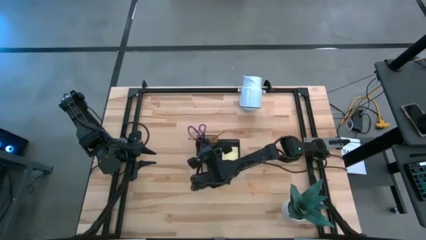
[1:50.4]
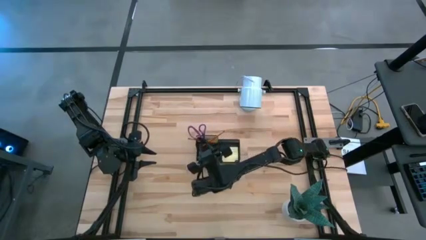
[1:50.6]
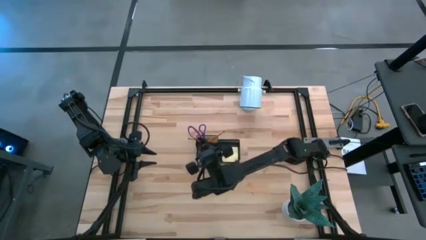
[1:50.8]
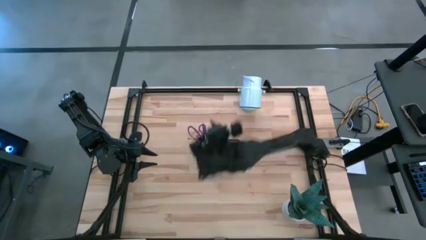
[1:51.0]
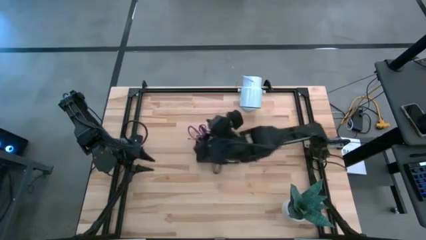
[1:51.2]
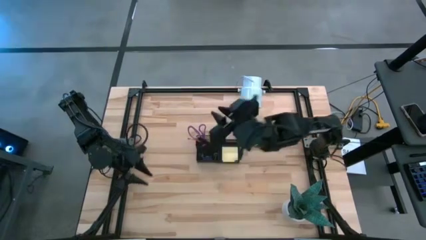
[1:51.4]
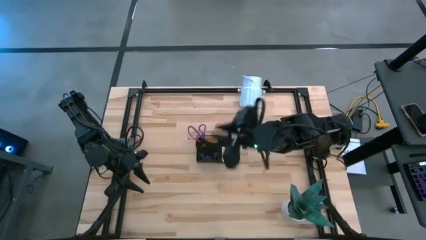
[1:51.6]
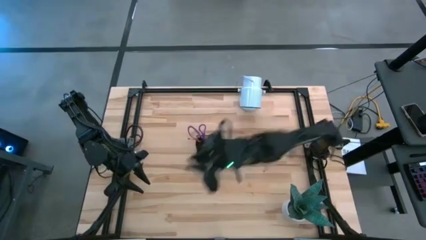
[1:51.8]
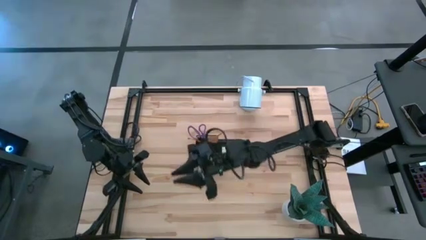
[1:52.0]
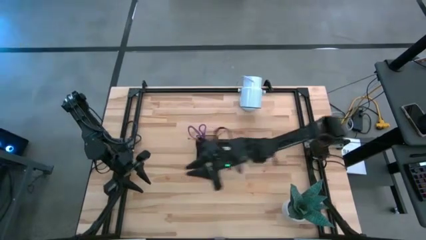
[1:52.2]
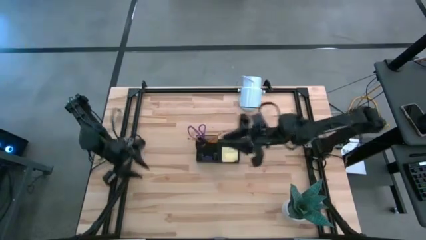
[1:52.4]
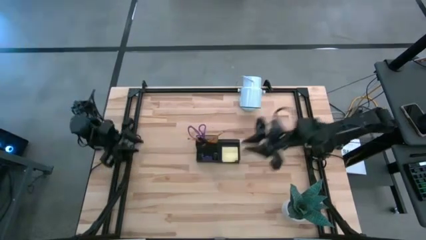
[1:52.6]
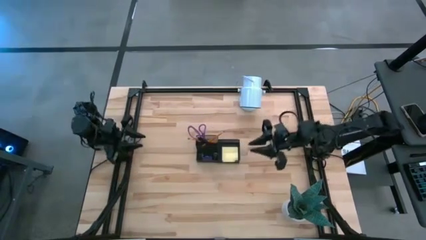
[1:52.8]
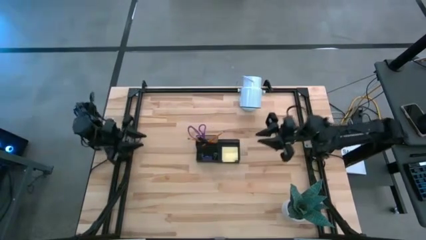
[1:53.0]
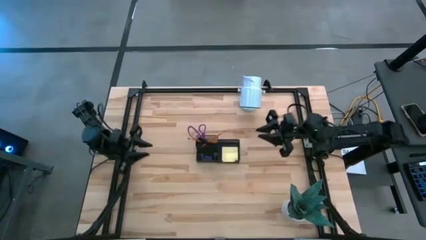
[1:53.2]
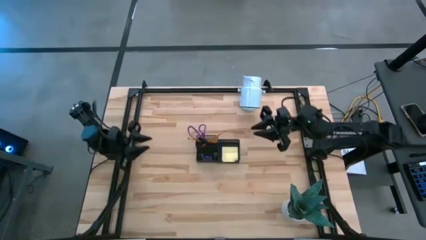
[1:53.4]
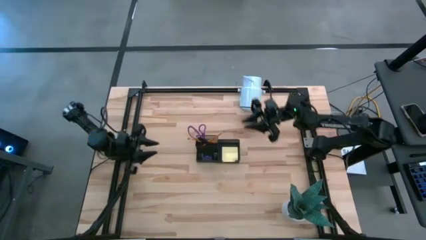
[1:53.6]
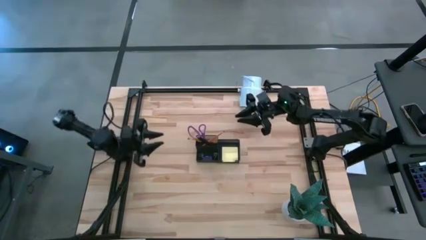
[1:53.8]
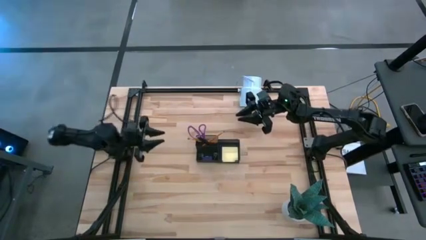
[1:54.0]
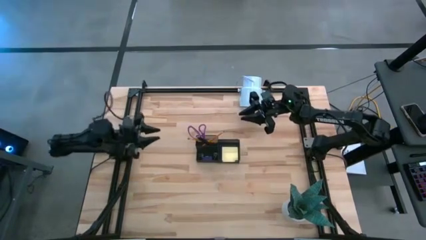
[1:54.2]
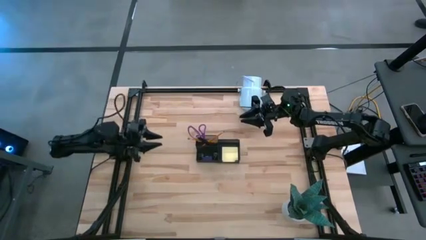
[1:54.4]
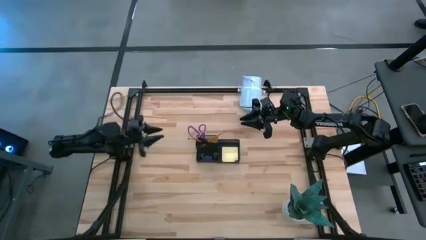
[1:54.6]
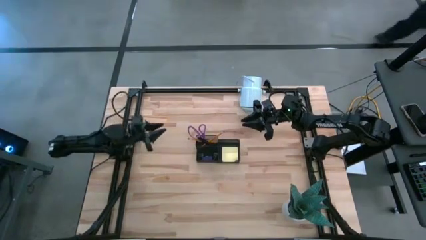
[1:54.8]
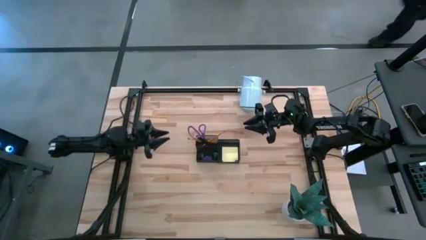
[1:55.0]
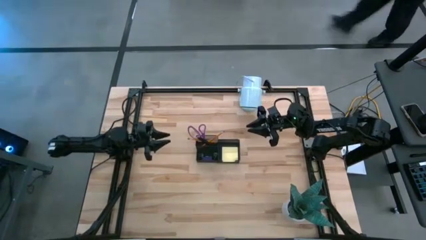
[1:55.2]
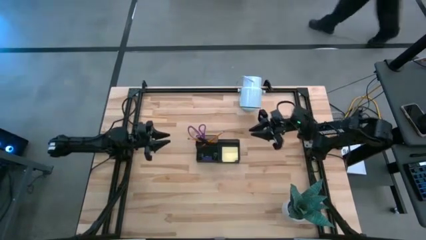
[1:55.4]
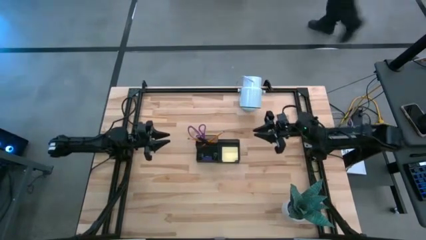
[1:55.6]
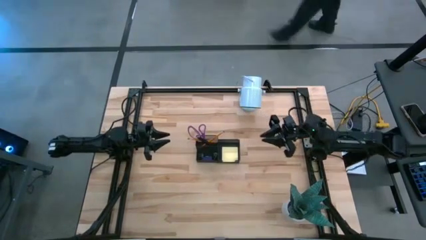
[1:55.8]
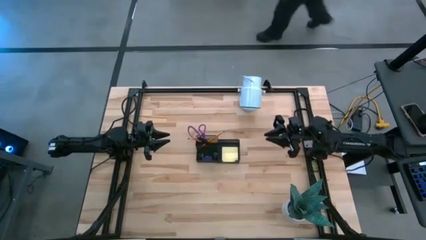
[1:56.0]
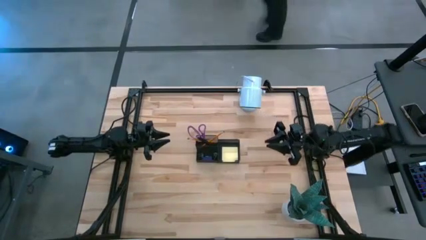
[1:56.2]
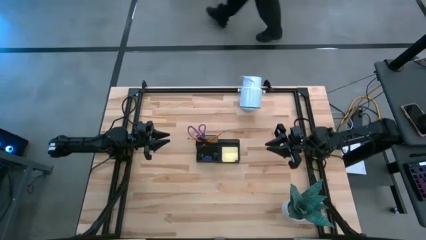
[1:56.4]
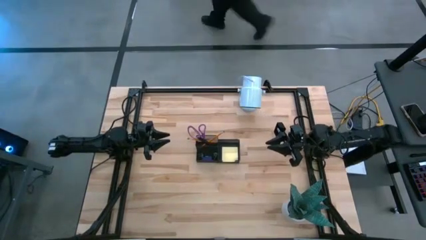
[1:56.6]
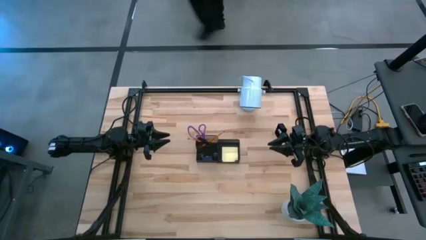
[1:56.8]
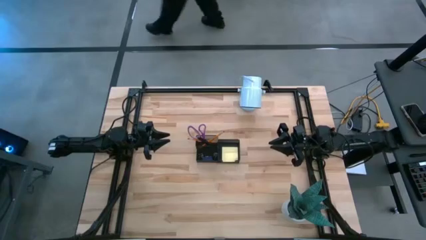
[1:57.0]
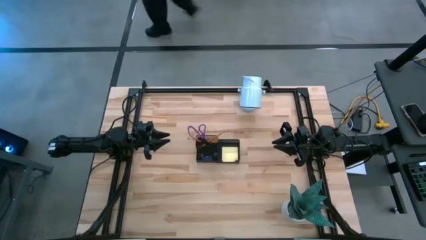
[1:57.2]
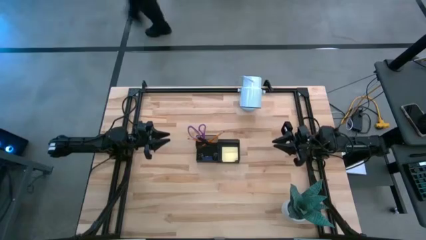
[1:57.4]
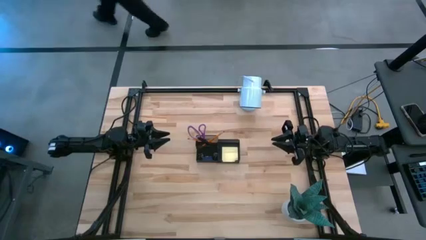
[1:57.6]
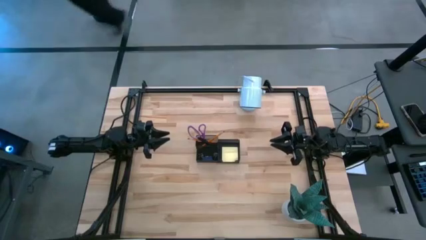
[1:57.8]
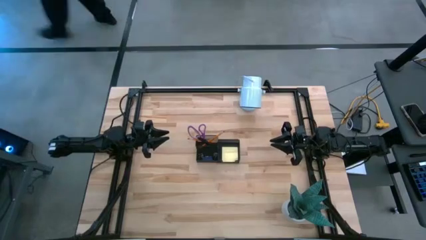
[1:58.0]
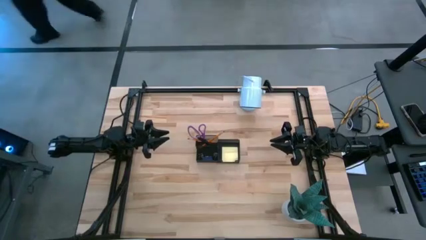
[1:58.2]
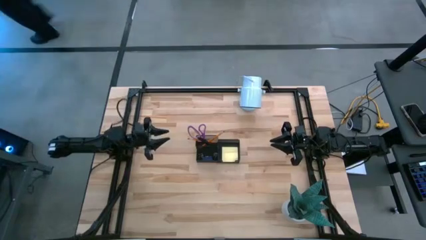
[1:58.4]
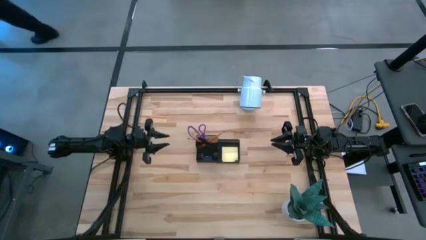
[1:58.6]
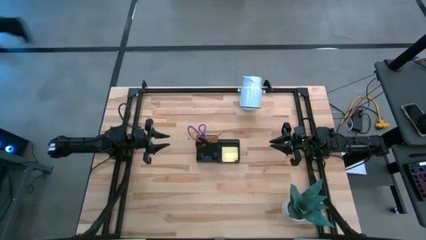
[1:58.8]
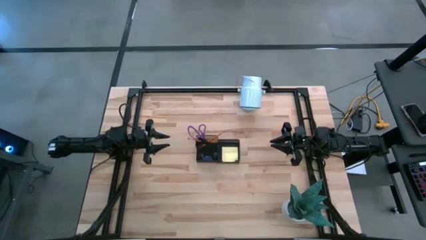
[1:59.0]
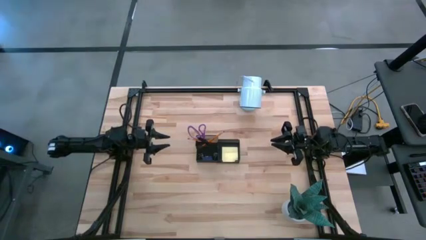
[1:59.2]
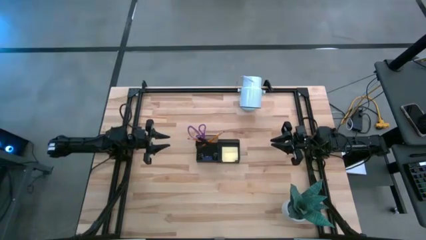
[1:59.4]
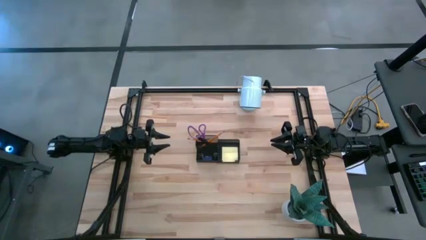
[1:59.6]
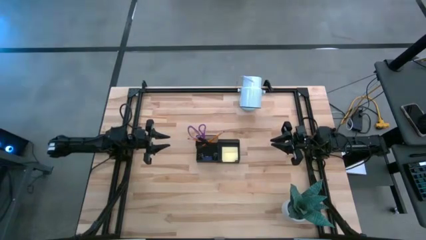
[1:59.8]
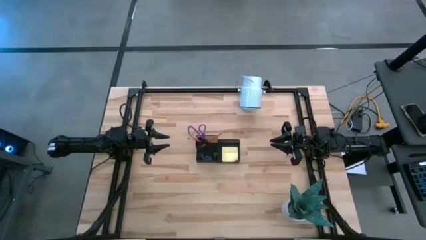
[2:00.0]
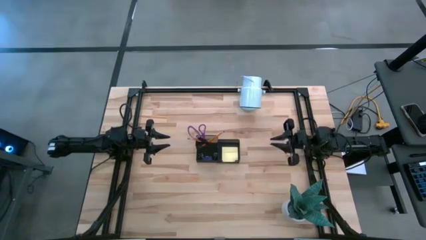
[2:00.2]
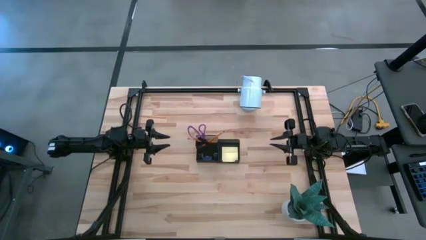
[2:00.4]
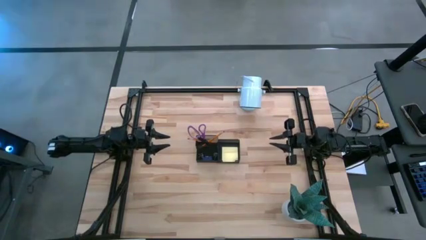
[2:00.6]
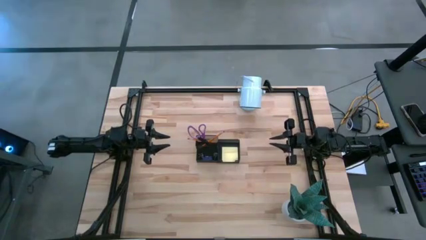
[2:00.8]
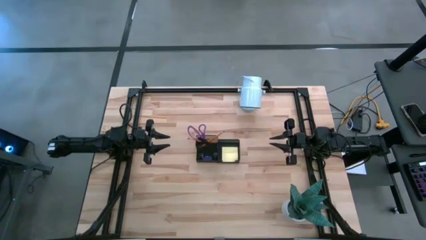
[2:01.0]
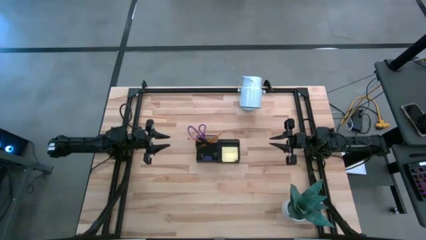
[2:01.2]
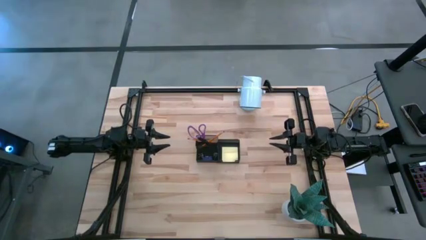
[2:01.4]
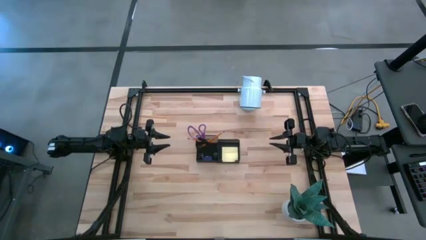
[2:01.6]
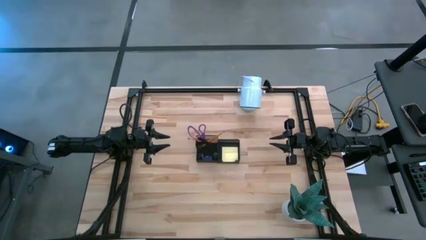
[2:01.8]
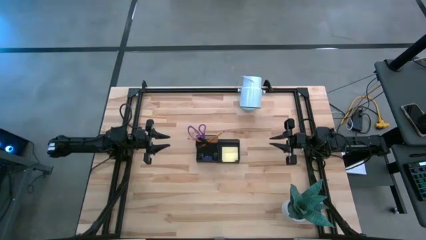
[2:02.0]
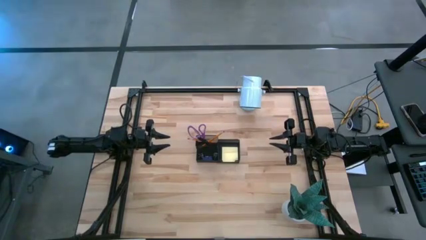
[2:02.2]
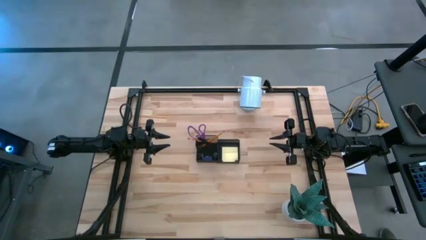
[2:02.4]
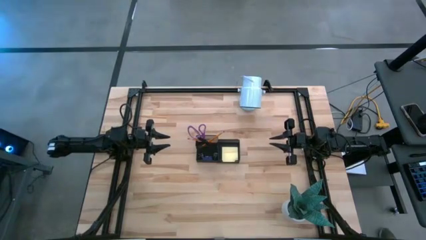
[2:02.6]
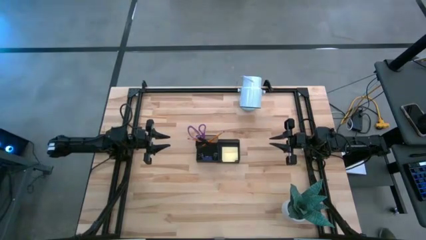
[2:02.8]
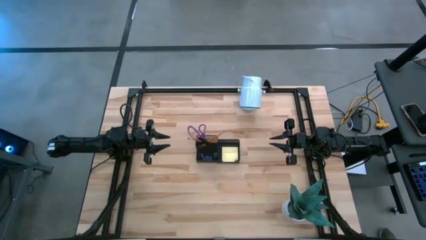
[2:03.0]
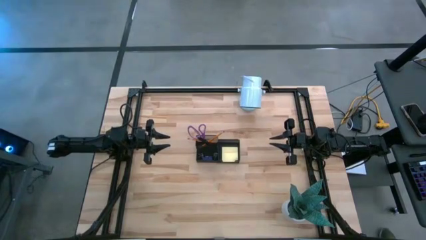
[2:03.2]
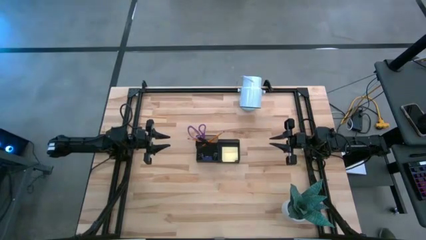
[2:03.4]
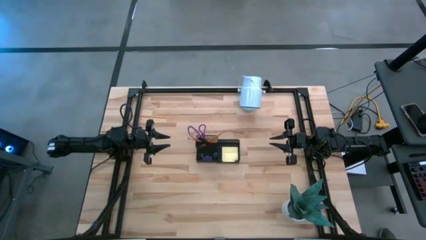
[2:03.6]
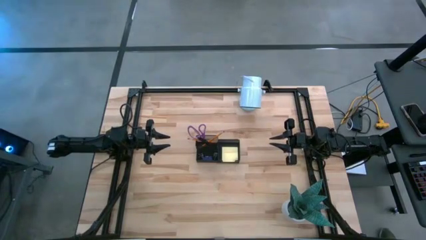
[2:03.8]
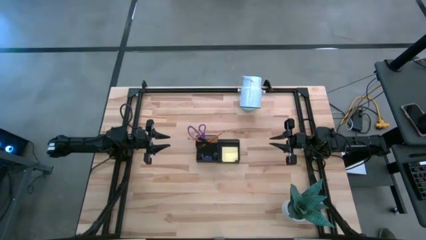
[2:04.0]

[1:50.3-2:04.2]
Task: Pick and place office supplies into organizer
Return to Home Position
